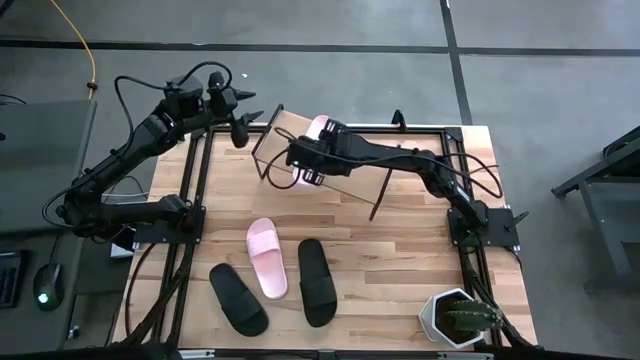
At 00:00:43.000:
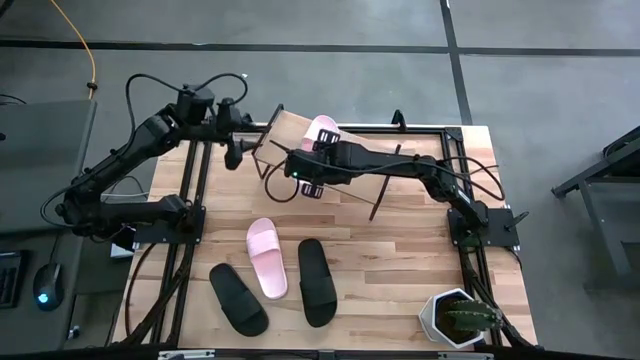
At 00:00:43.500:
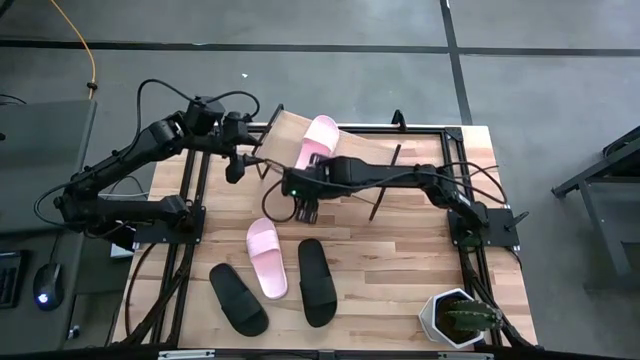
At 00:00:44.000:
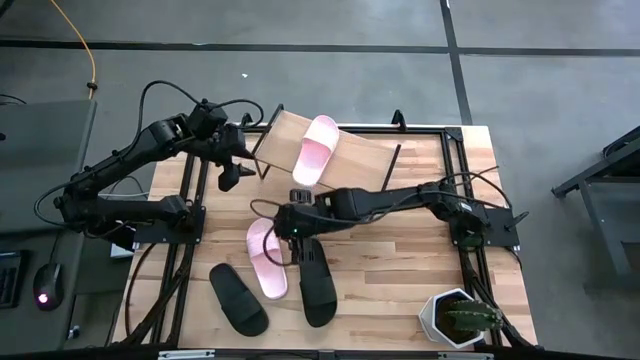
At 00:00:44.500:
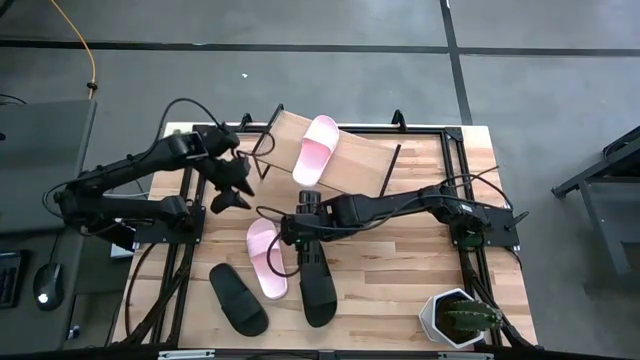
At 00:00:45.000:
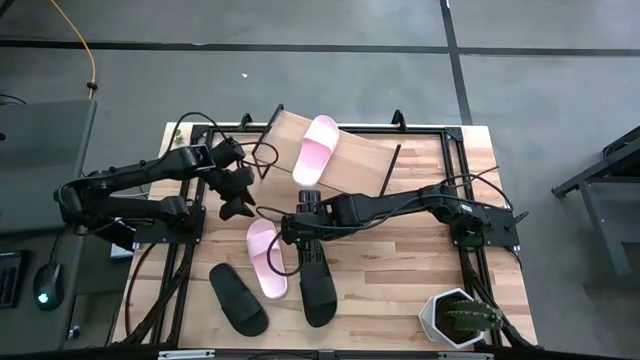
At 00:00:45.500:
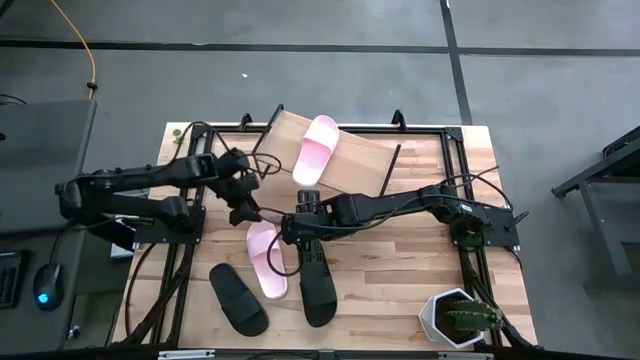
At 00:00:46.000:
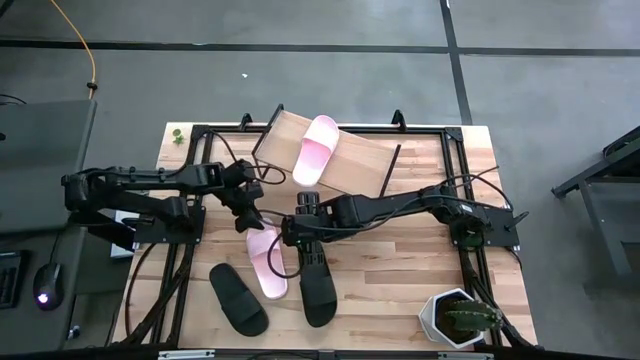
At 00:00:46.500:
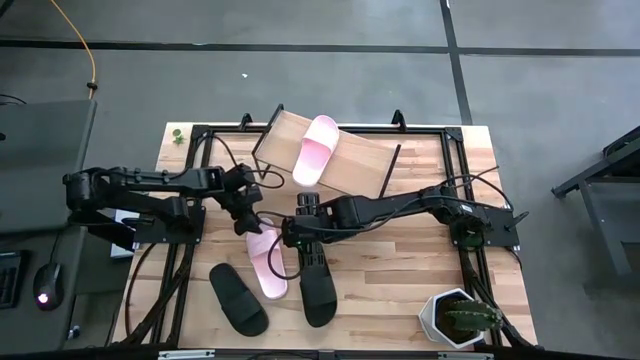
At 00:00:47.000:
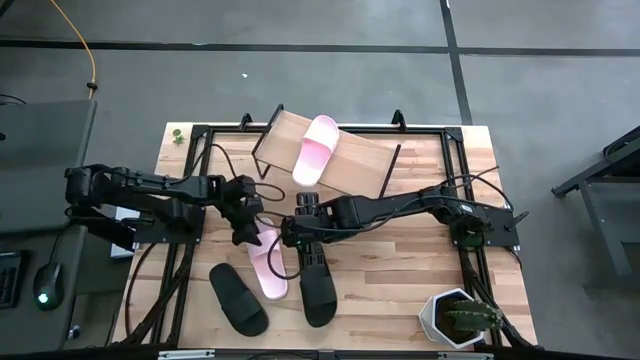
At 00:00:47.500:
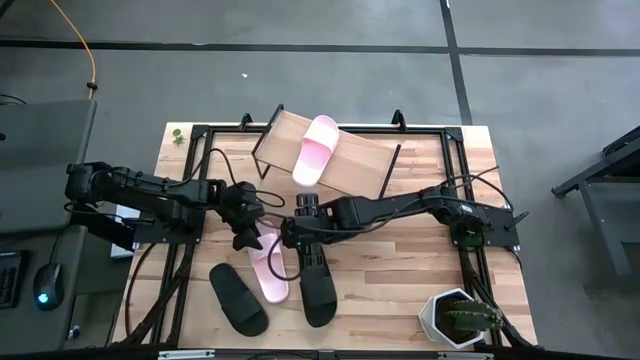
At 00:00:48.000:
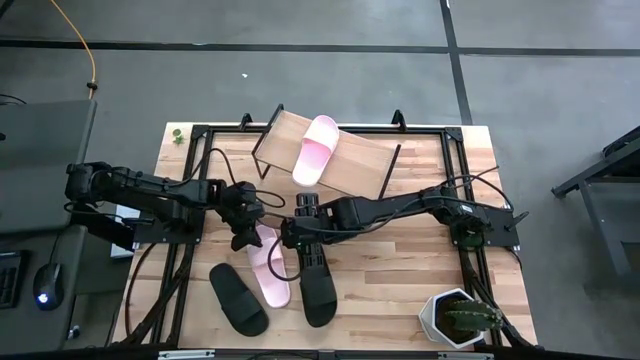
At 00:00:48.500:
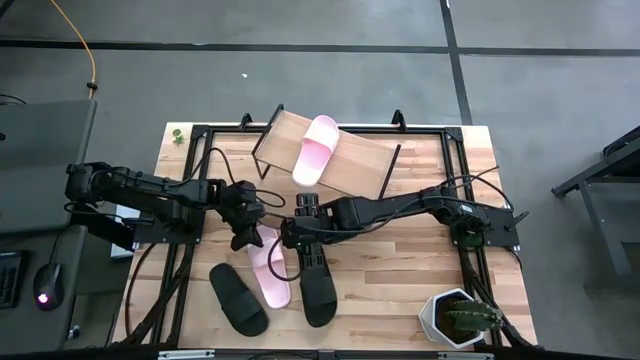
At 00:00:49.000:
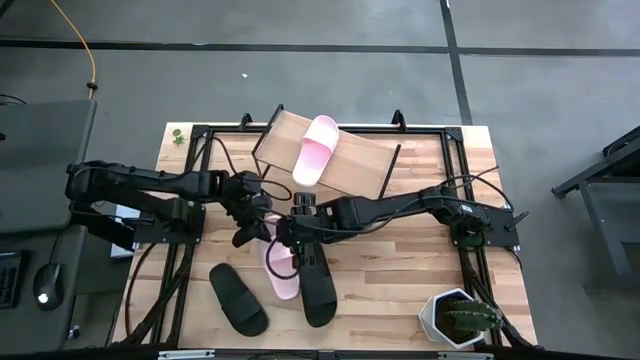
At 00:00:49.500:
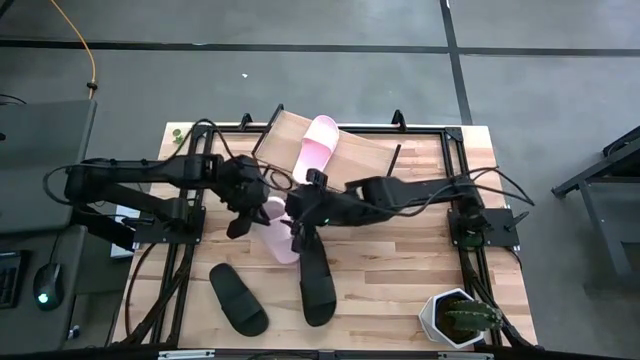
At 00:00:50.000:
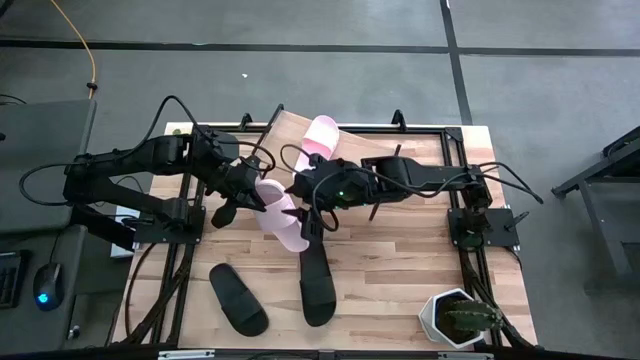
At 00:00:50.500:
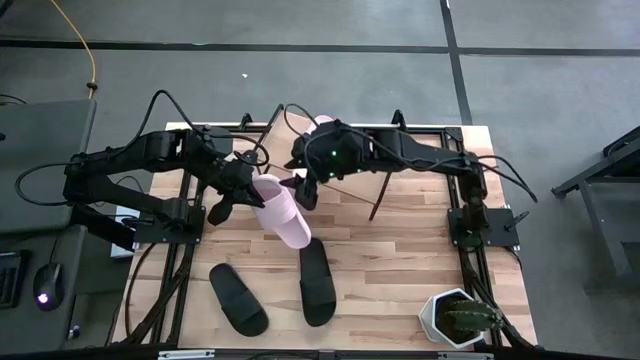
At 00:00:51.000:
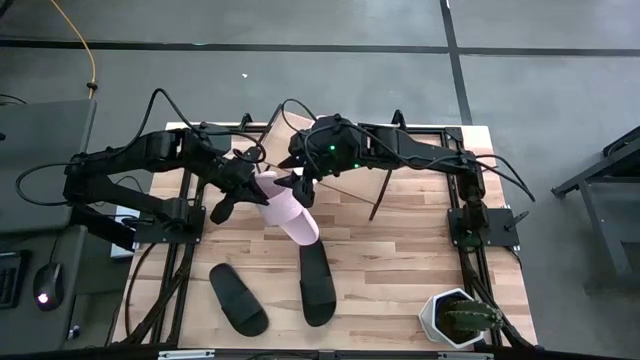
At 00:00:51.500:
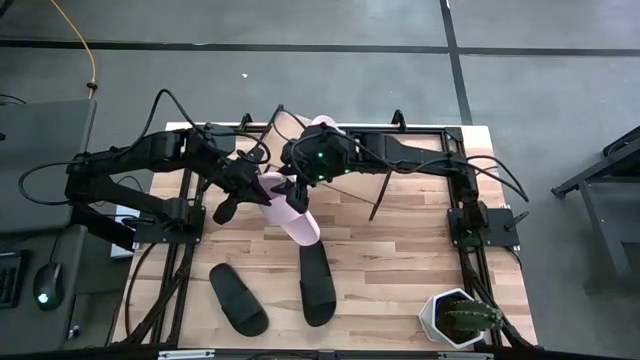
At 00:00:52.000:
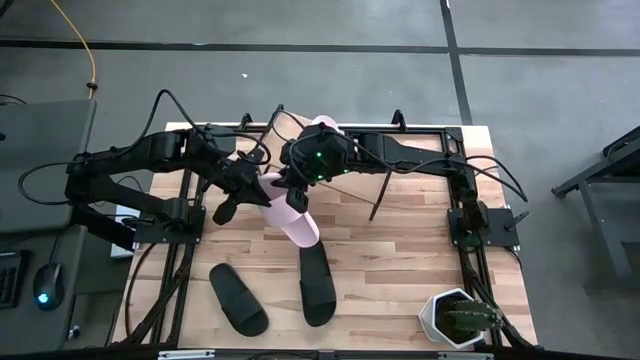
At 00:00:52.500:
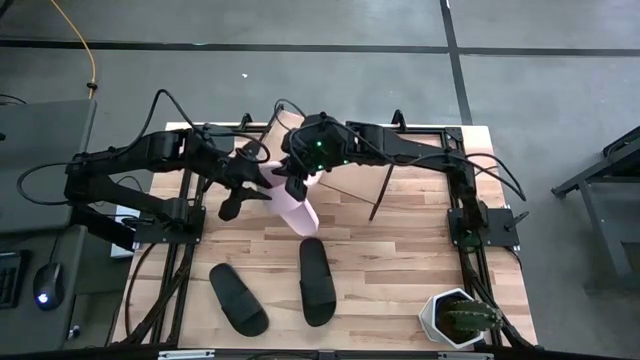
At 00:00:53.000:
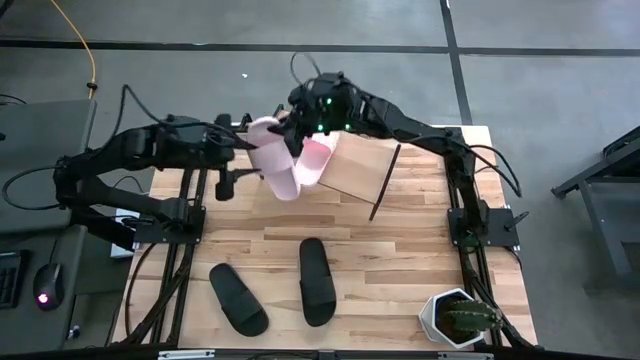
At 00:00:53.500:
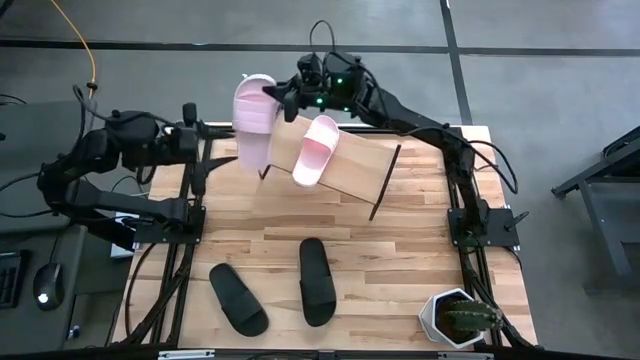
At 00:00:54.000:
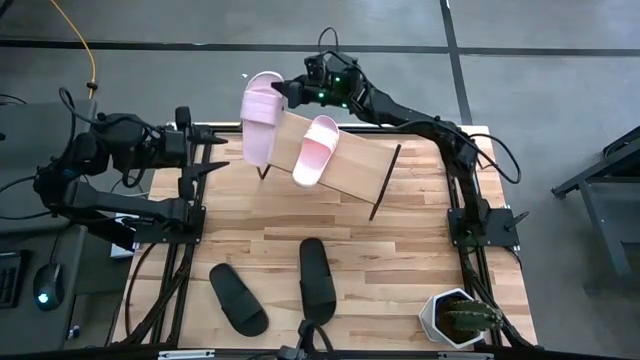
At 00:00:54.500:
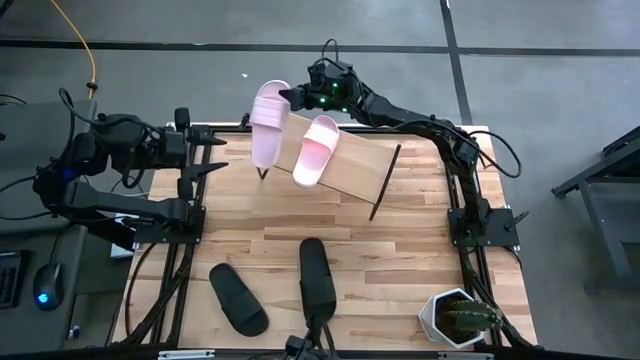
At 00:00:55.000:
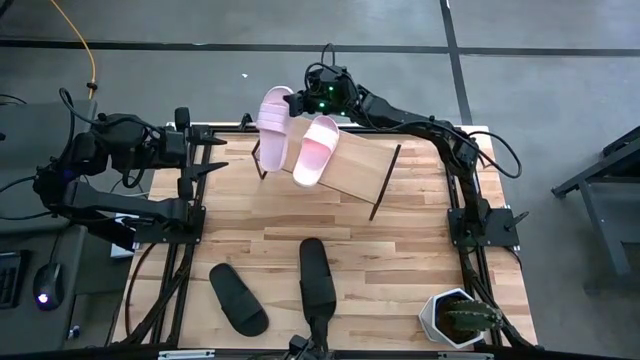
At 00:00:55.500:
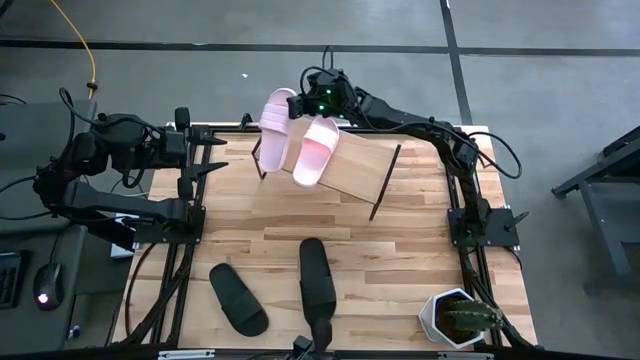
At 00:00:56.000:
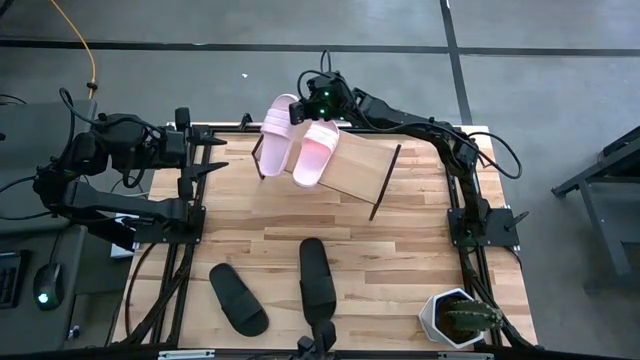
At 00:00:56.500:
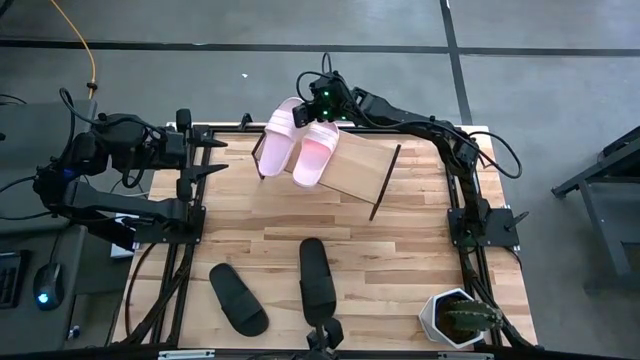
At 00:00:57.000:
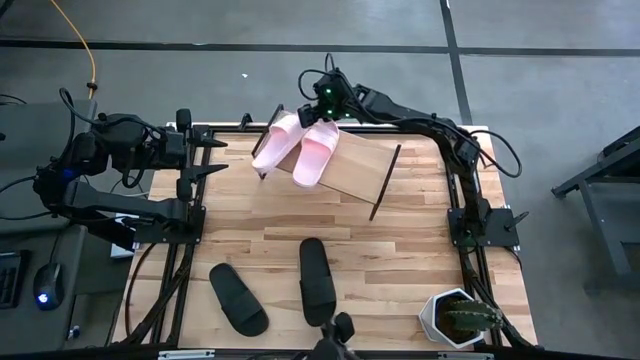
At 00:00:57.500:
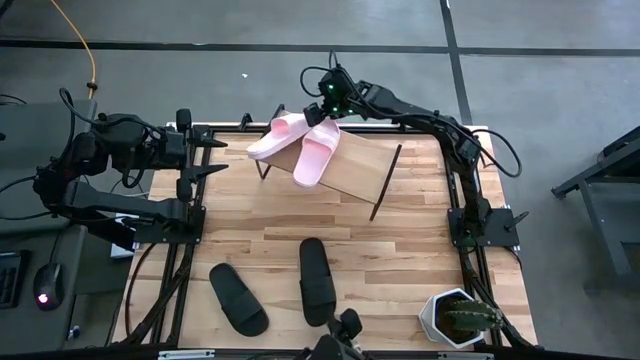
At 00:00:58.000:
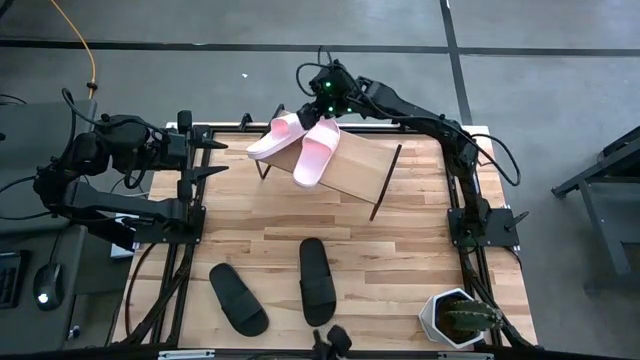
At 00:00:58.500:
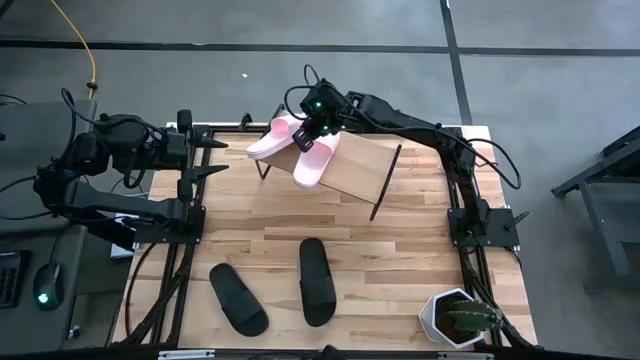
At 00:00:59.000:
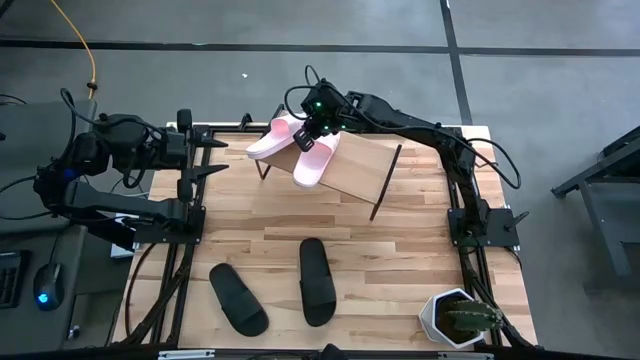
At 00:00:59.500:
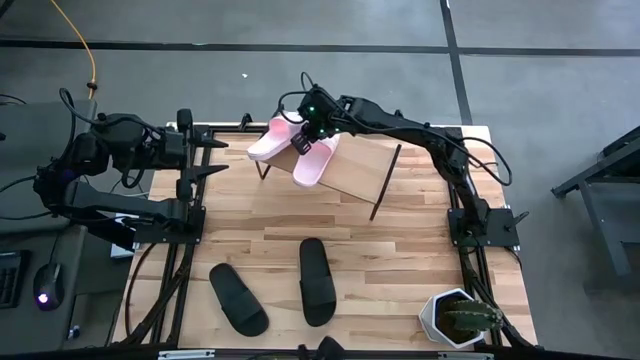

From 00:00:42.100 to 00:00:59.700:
Task: Pick and place slides into the shelf
Put the pink slide on the shelf

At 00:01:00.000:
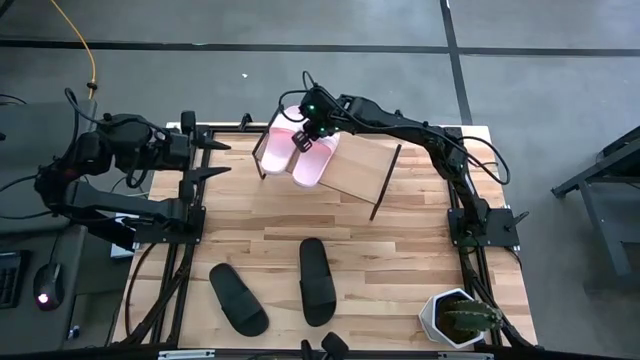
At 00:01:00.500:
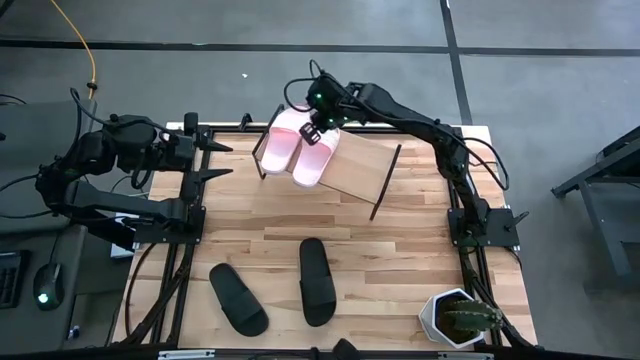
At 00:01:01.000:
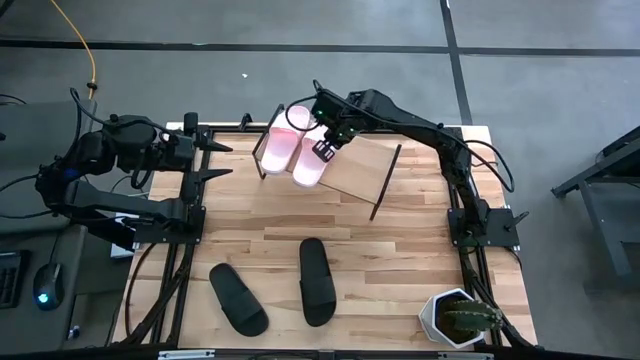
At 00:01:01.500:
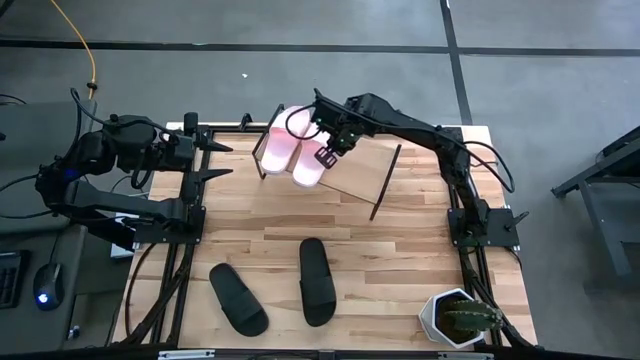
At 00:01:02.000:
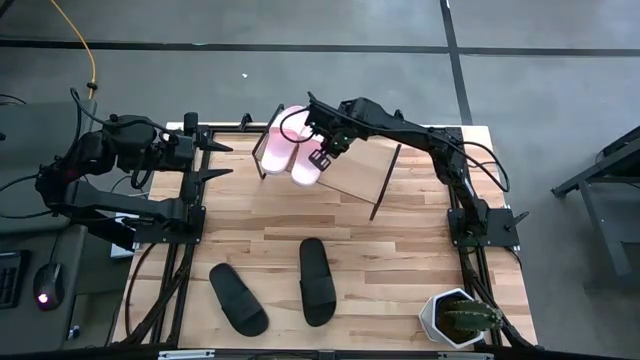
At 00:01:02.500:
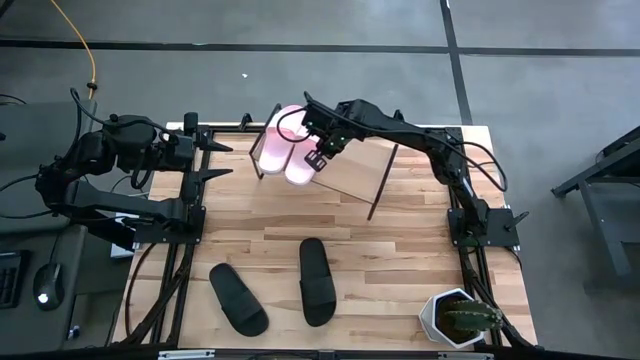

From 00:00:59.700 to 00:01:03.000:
Adjust the pink slide on the shelf
